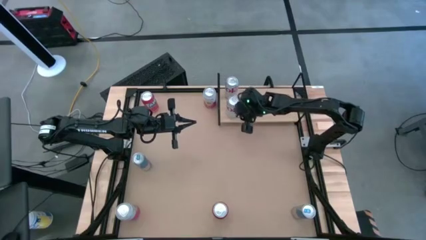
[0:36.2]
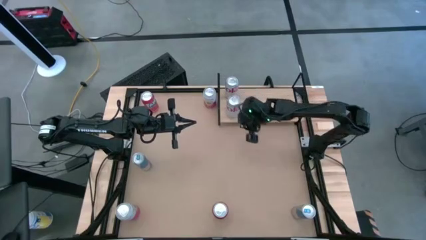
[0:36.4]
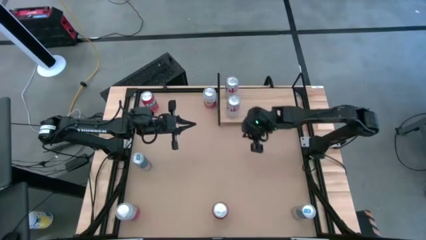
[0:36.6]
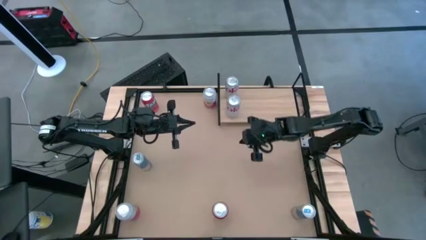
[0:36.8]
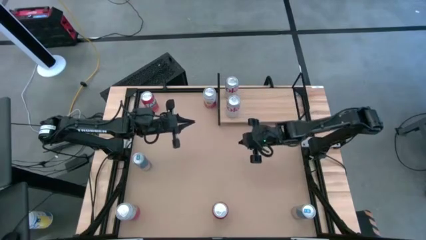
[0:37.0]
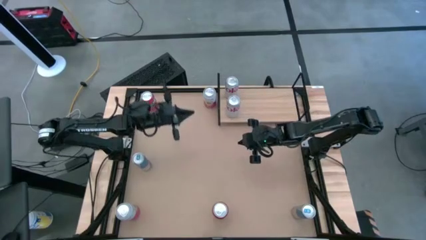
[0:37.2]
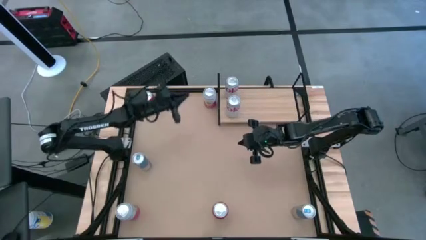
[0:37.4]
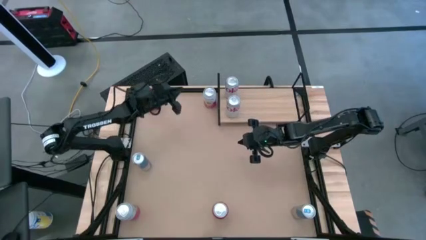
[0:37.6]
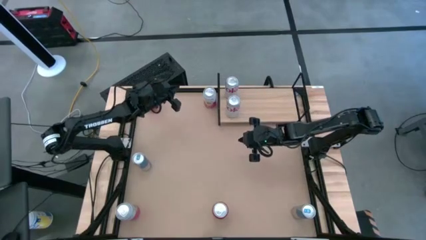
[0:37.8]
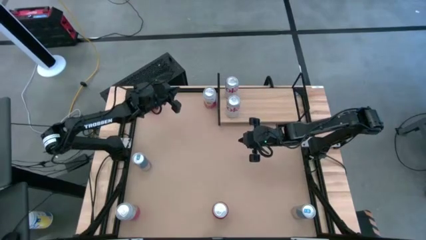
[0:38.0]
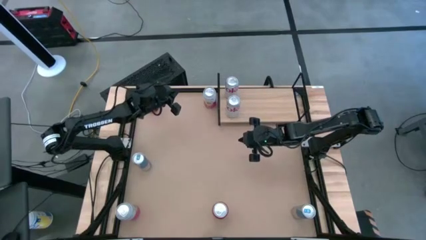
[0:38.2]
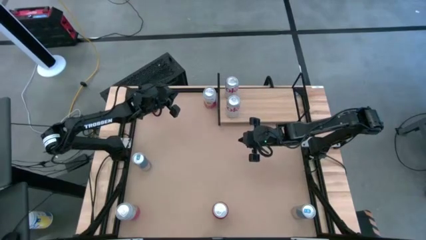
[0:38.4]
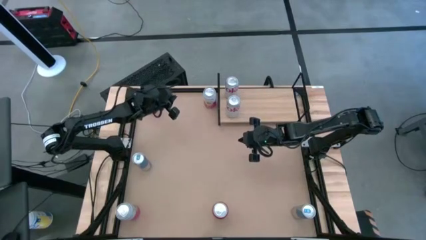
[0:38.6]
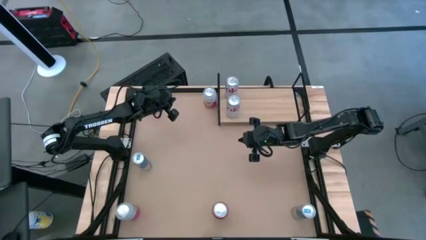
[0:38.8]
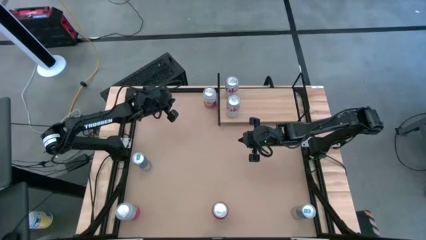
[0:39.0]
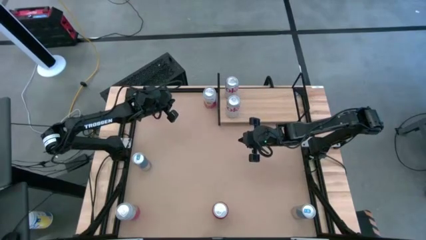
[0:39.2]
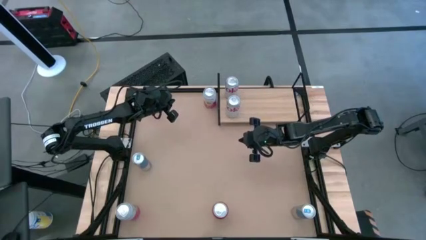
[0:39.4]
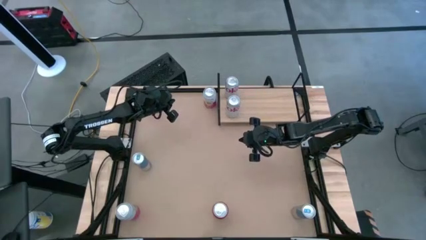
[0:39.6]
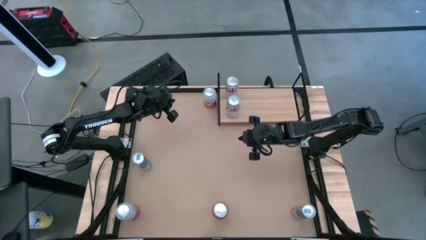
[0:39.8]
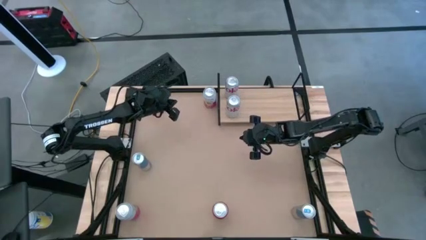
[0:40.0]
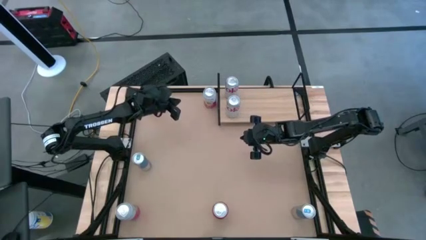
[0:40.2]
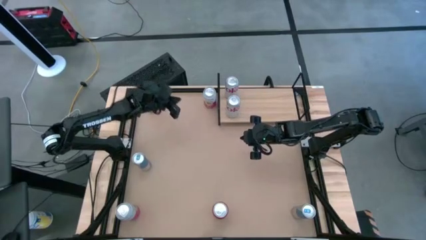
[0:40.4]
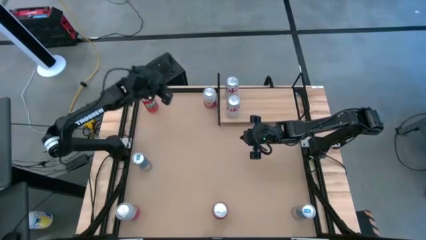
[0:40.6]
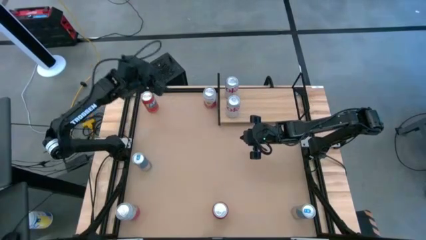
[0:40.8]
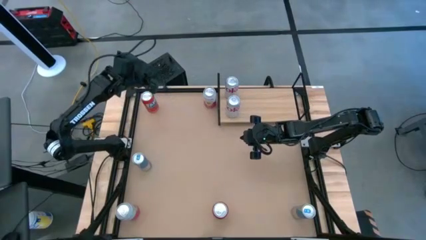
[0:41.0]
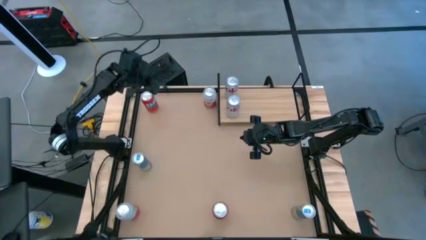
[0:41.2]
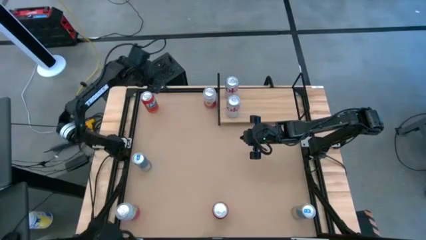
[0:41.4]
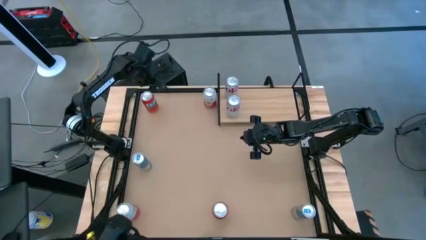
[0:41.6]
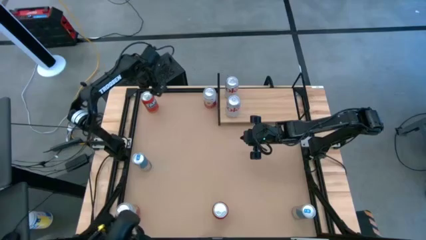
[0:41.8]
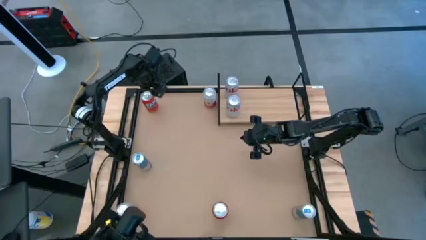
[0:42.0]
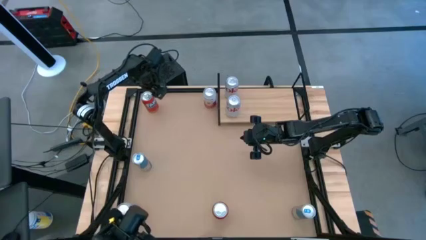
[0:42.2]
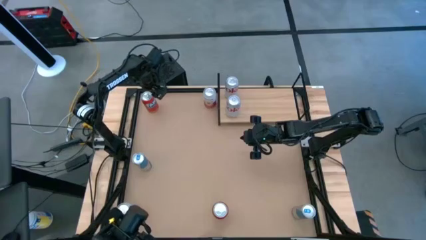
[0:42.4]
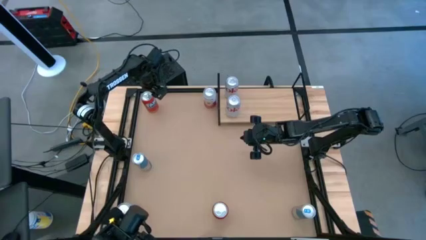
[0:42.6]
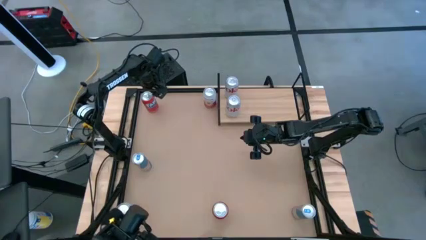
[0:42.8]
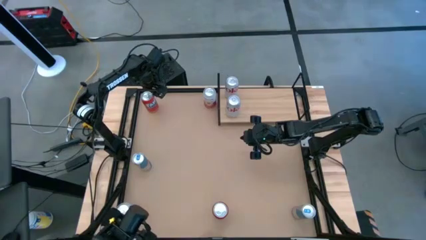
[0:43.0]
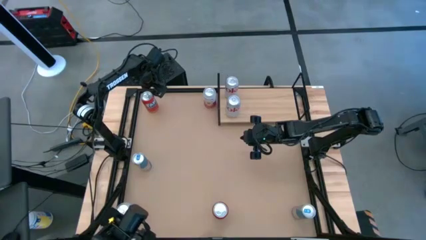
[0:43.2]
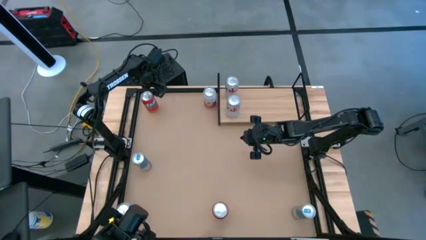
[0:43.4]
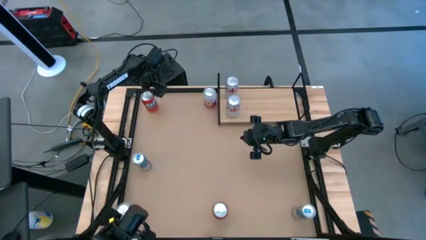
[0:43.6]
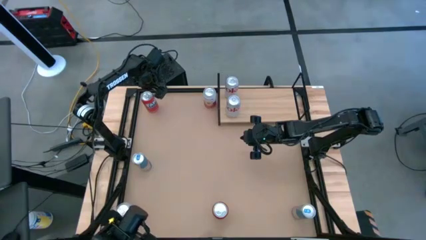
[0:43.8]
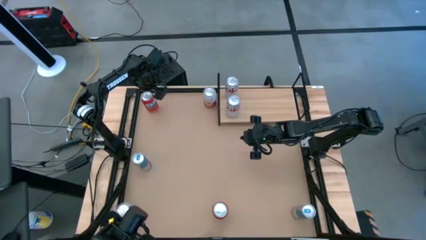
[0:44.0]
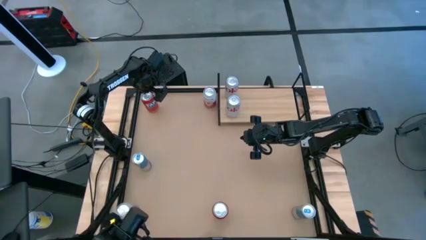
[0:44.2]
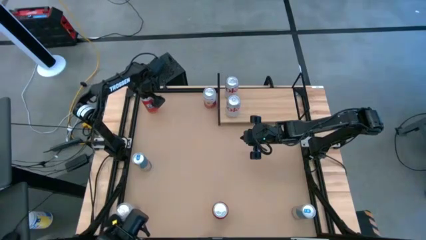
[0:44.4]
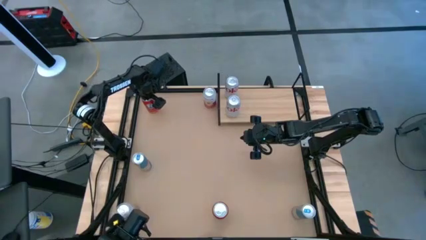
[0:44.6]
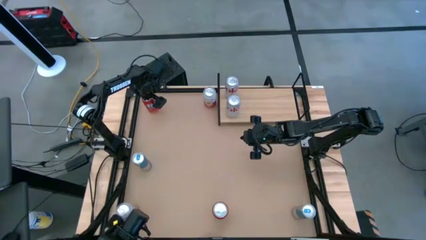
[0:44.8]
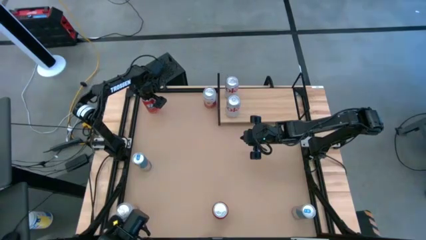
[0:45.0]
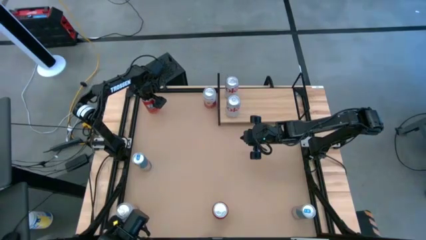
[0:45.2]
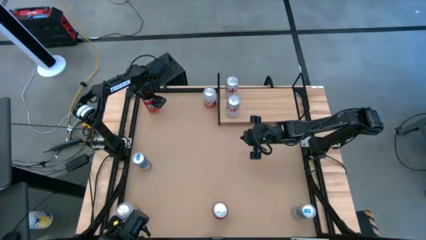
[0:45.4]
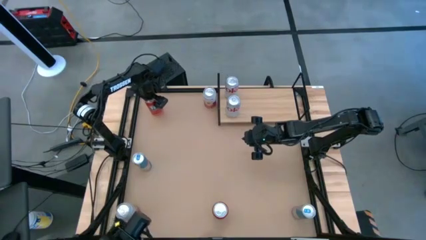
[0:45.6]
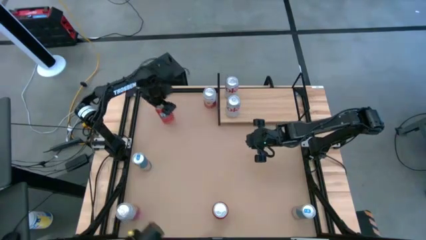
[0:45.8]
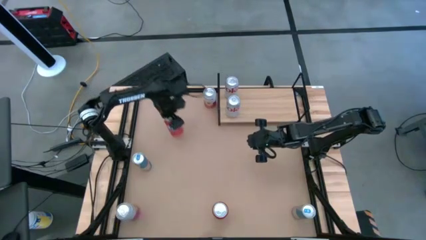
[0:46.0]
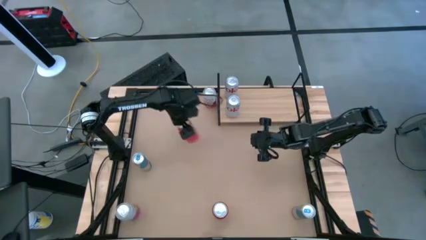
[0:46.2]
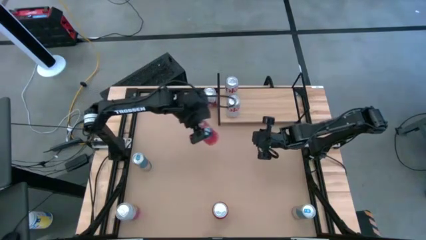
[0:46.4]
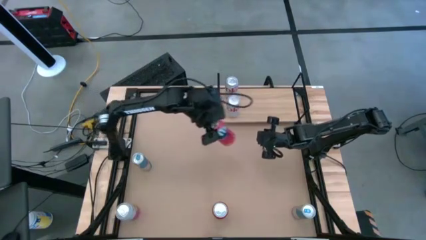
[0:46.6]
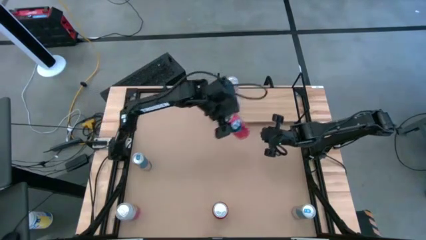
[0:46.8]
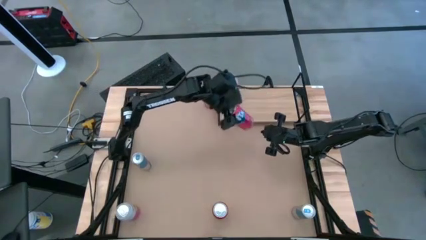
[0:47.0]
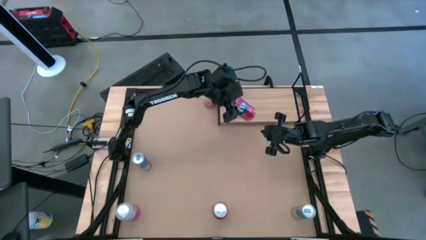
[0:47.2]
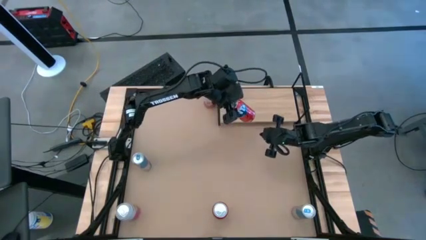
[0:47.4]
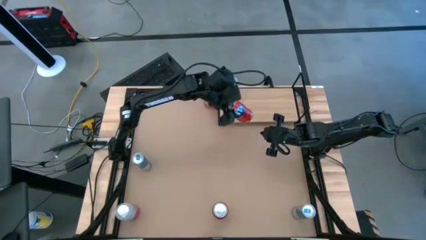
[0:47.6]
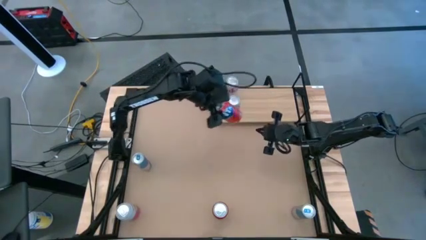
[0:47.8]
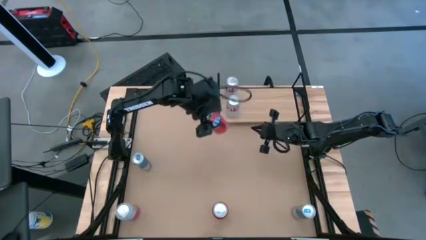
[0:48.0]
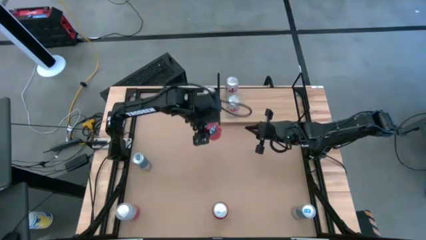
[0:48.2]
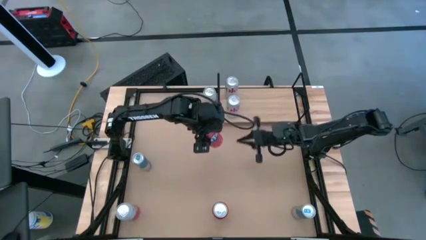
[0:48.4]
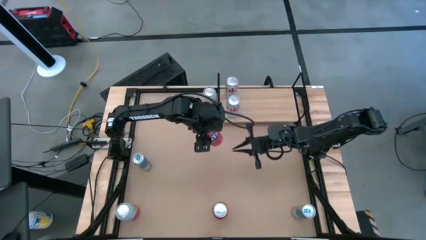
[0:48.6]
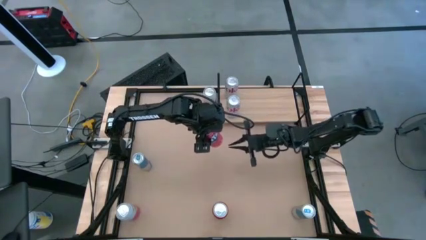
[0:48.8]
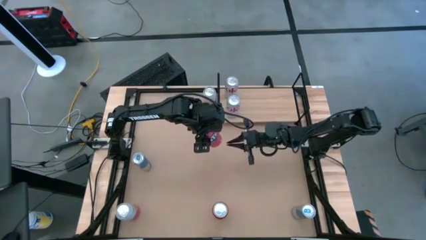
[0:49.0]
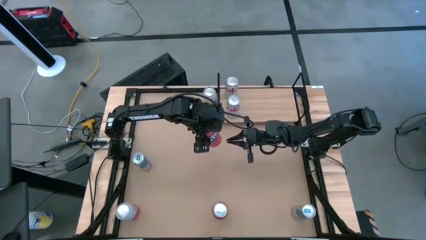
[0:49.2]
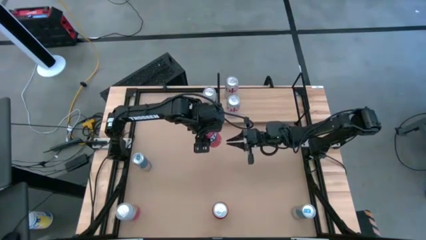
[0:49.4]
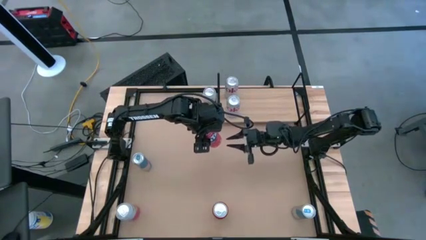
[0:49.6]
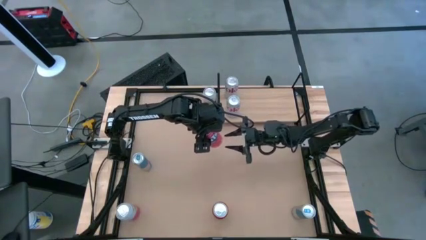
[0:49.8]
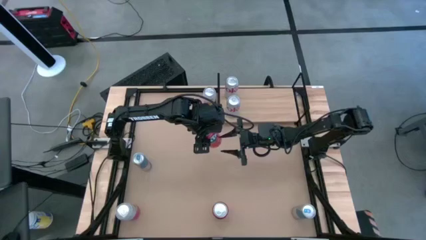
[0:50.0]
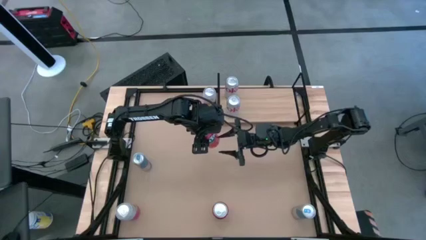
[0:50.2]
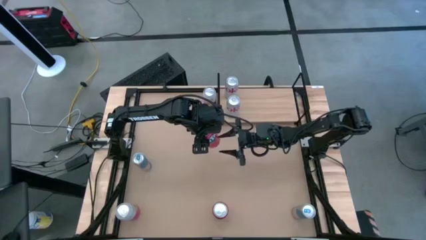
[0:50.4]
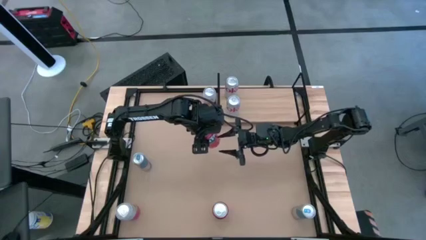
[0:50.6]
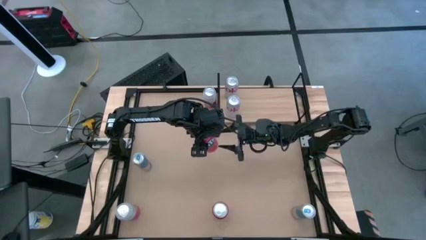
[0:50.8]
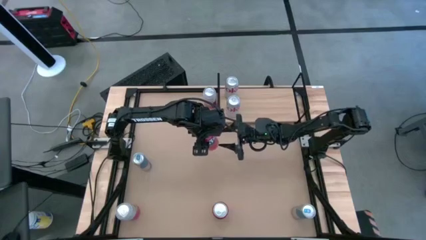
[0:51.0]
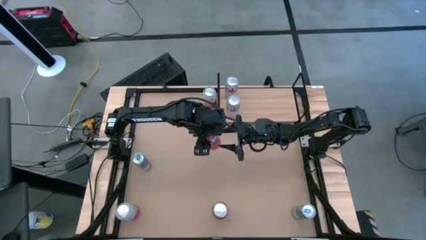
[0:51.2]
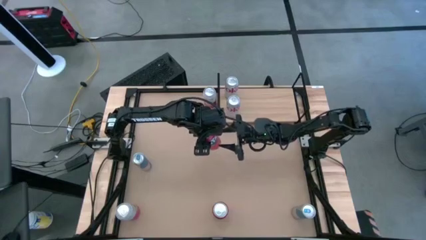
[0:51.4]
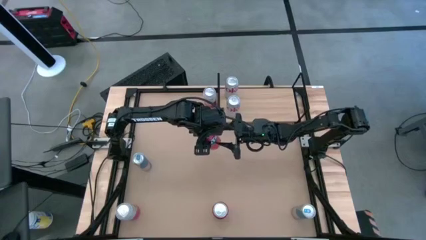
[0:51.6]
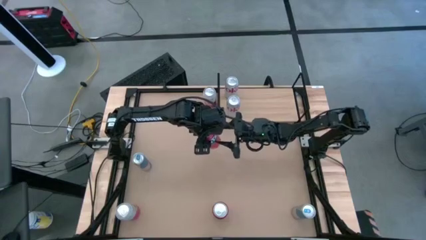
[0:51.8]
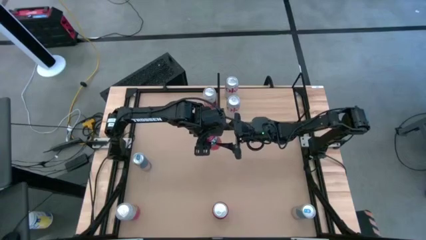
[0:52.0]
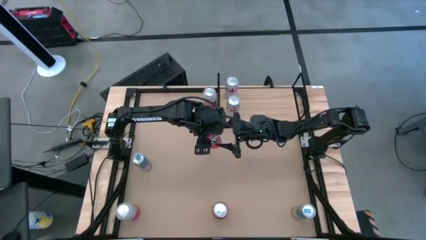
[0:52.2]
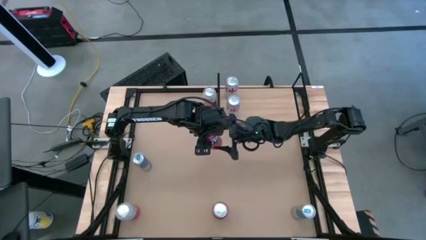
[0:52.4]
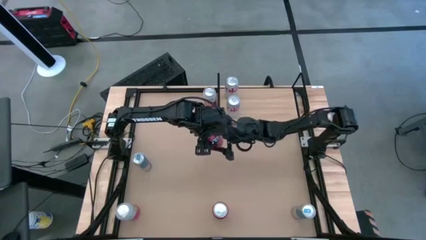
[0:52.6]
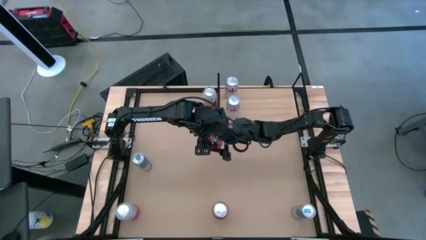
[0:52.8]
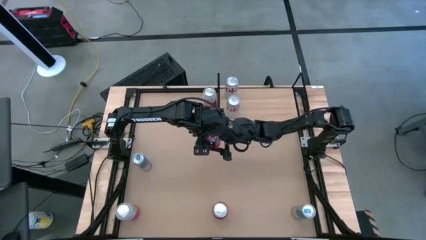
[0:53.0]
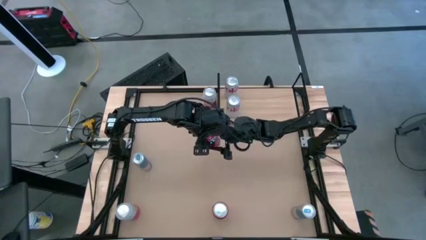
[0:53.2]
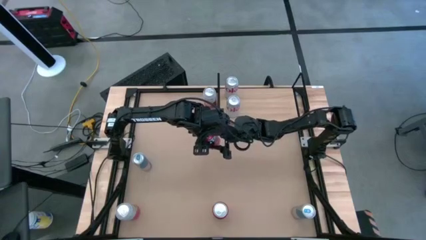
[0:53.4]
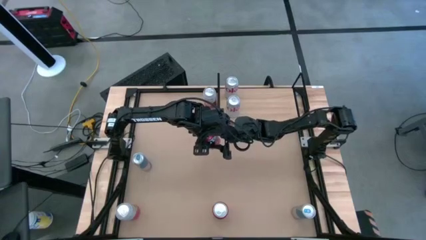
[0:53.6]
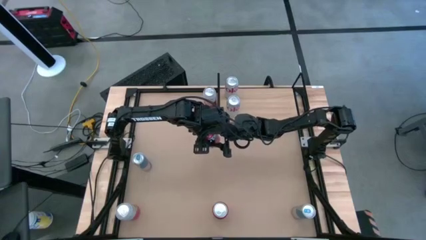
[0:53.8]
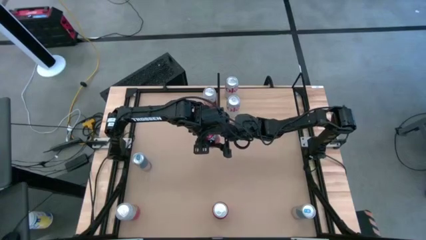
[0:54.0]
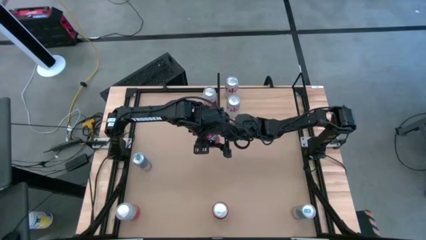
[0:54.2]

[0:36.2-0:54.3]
Task: Place canned beverage on shelf
Put the top orange soda can on the shelf
